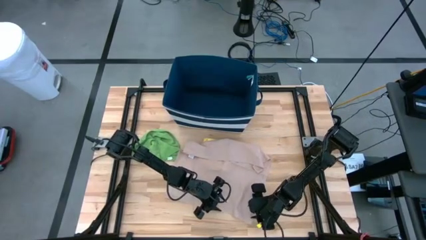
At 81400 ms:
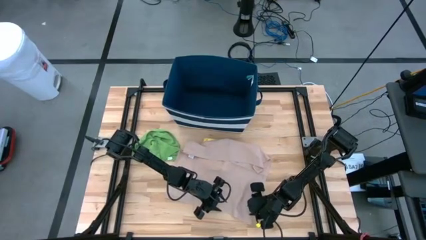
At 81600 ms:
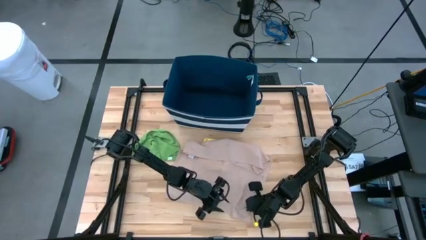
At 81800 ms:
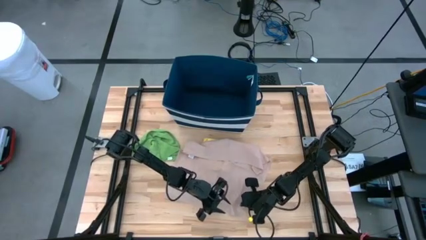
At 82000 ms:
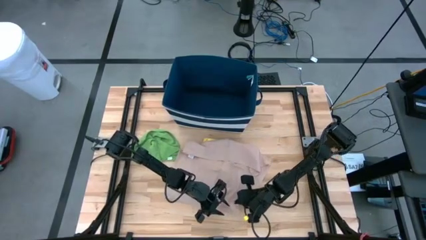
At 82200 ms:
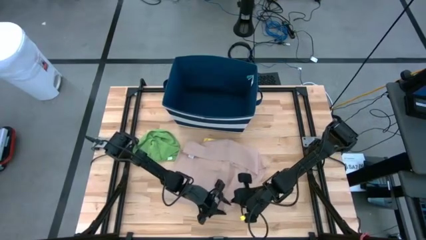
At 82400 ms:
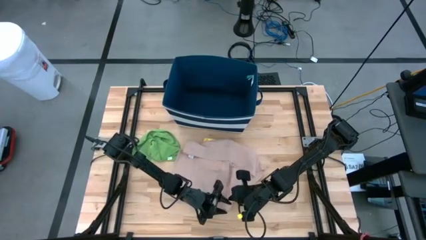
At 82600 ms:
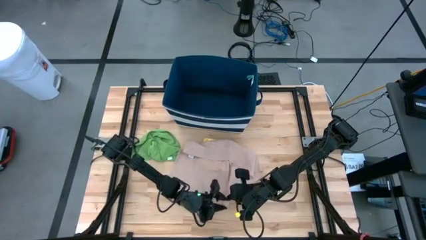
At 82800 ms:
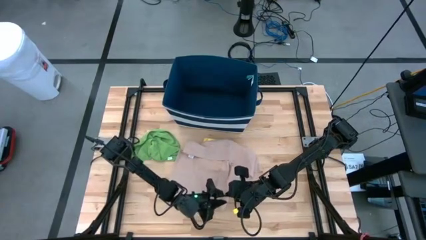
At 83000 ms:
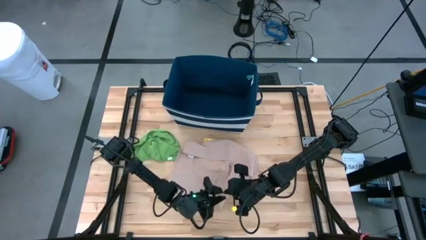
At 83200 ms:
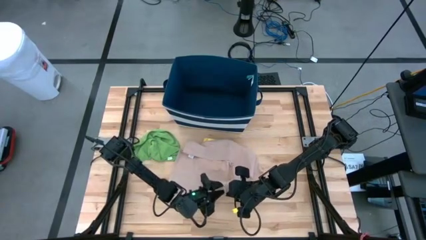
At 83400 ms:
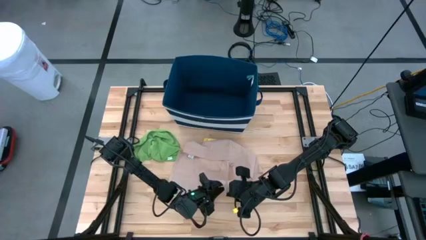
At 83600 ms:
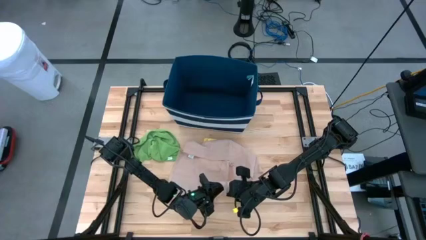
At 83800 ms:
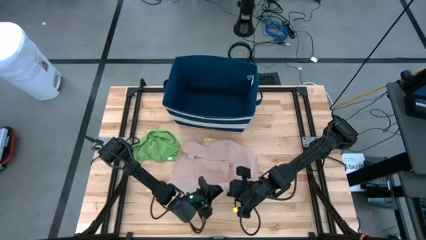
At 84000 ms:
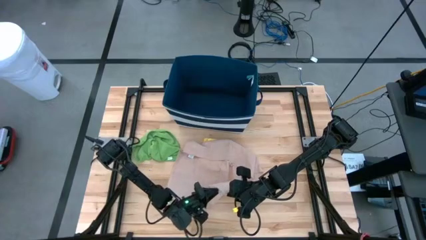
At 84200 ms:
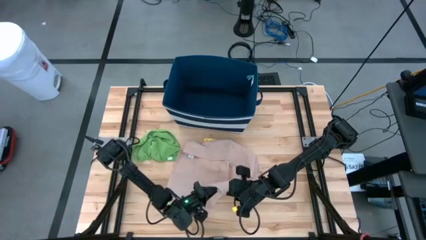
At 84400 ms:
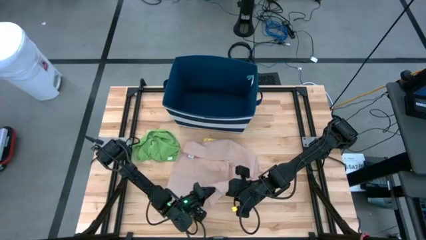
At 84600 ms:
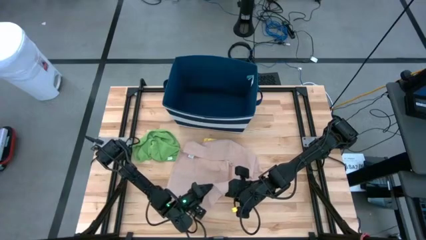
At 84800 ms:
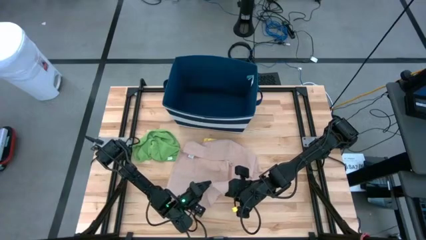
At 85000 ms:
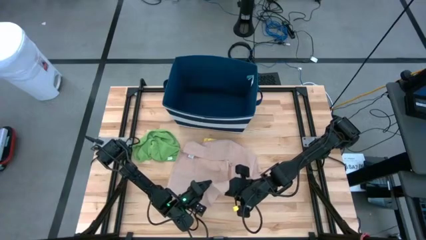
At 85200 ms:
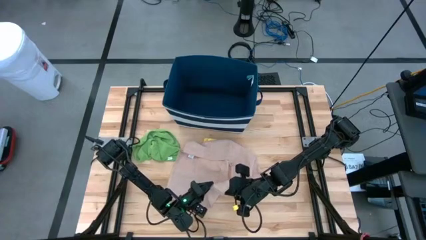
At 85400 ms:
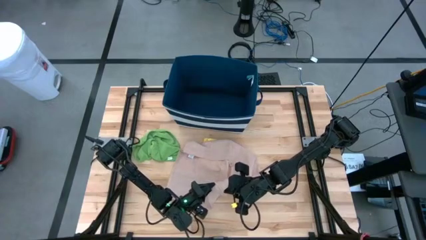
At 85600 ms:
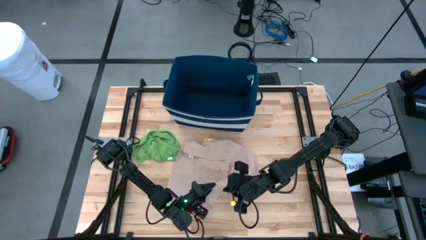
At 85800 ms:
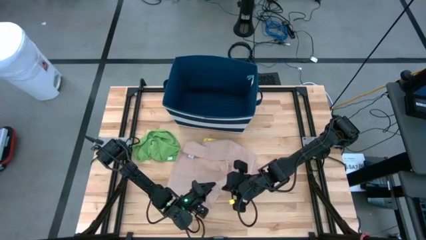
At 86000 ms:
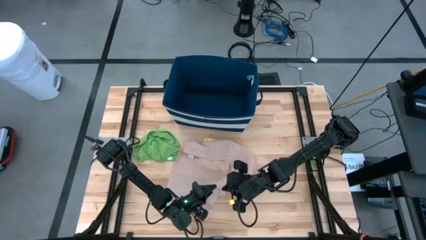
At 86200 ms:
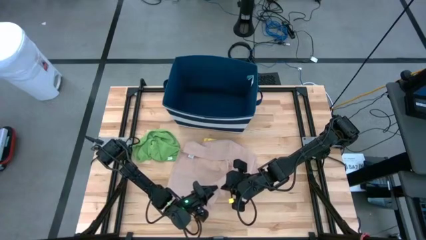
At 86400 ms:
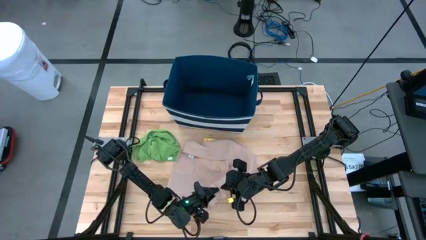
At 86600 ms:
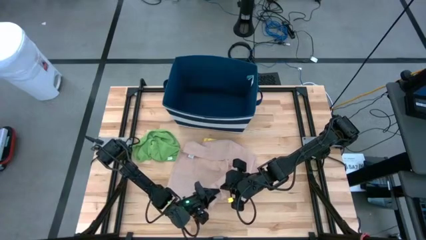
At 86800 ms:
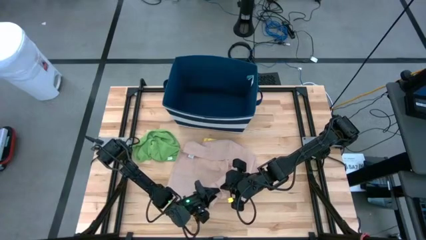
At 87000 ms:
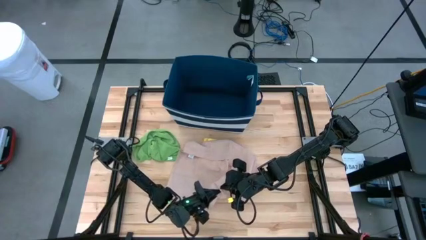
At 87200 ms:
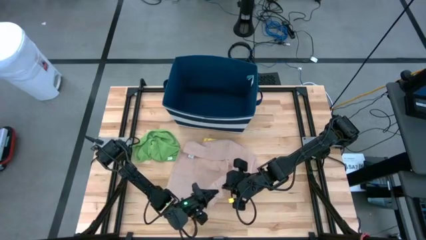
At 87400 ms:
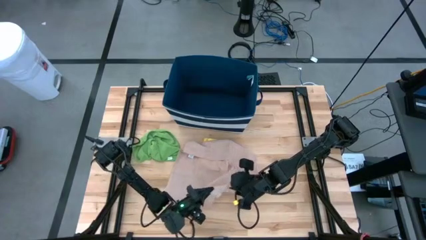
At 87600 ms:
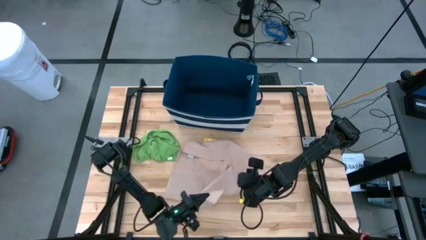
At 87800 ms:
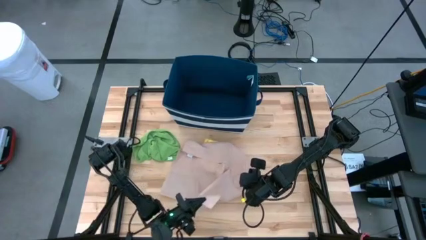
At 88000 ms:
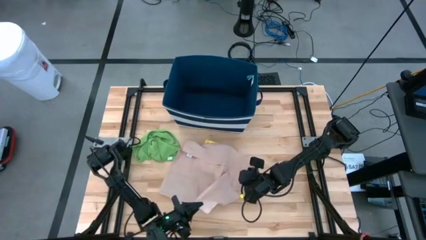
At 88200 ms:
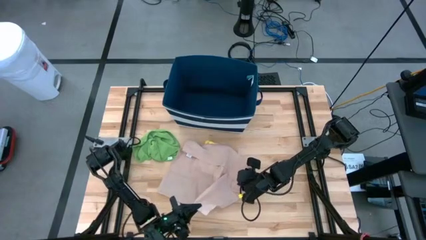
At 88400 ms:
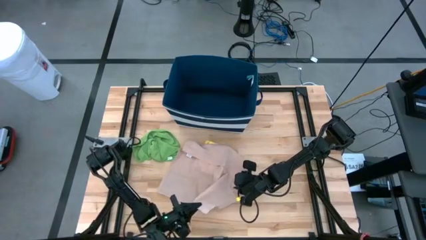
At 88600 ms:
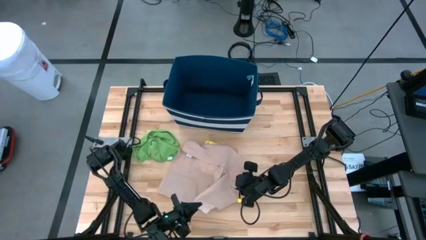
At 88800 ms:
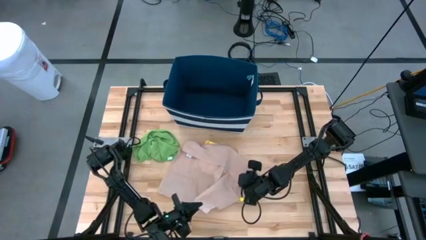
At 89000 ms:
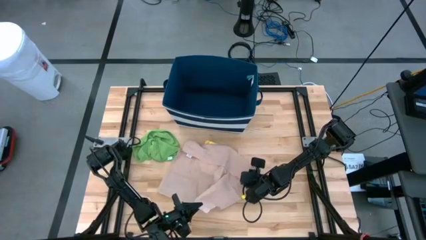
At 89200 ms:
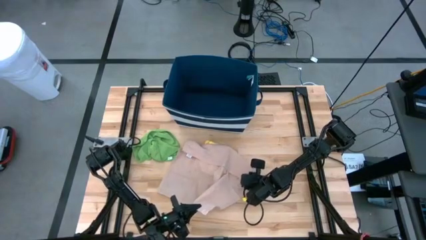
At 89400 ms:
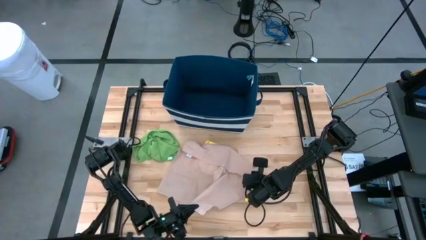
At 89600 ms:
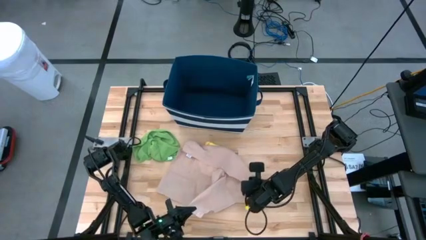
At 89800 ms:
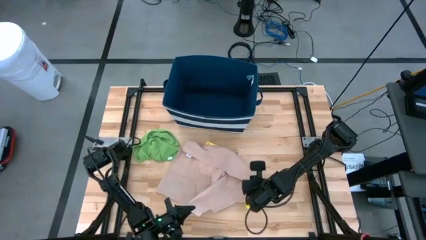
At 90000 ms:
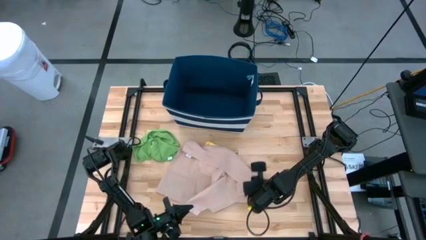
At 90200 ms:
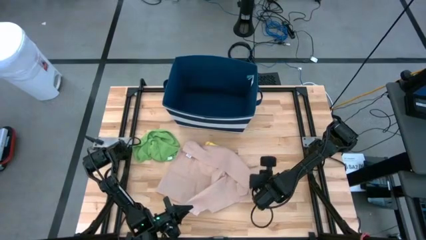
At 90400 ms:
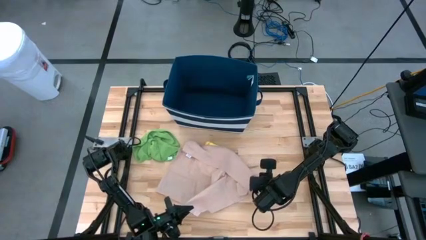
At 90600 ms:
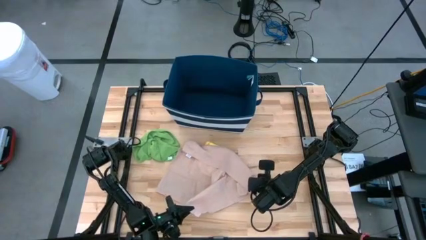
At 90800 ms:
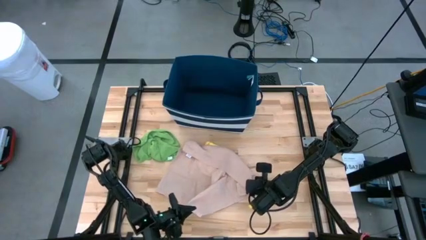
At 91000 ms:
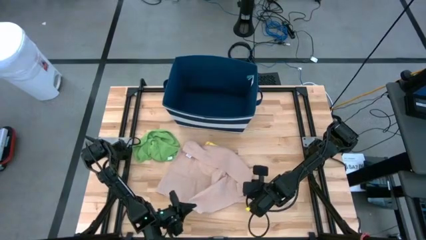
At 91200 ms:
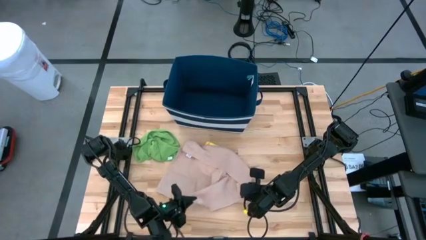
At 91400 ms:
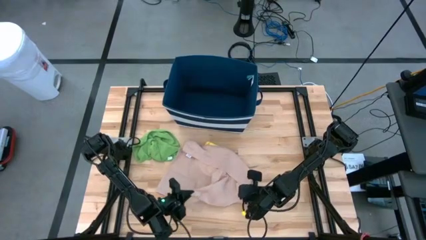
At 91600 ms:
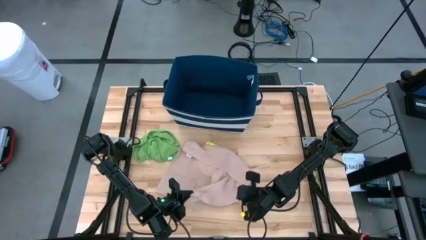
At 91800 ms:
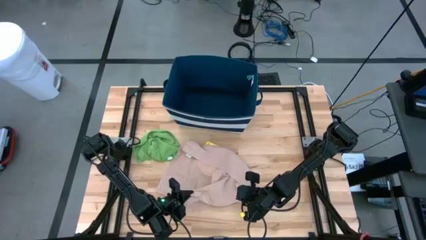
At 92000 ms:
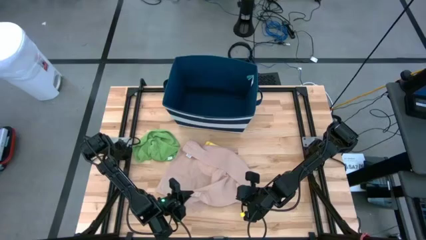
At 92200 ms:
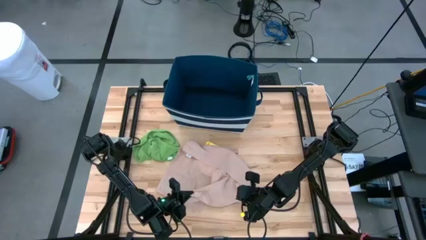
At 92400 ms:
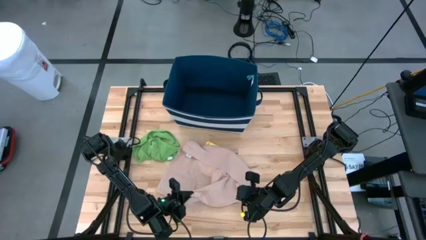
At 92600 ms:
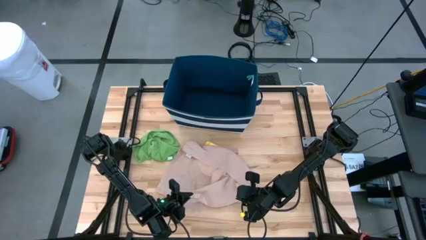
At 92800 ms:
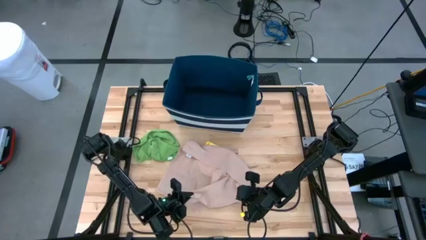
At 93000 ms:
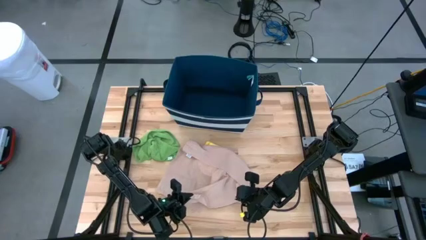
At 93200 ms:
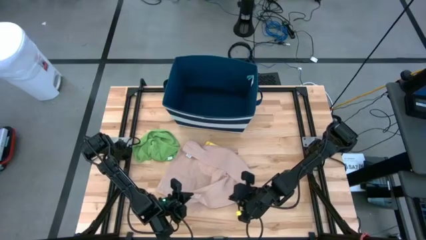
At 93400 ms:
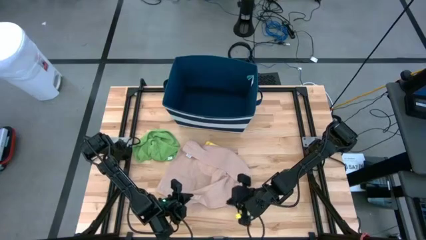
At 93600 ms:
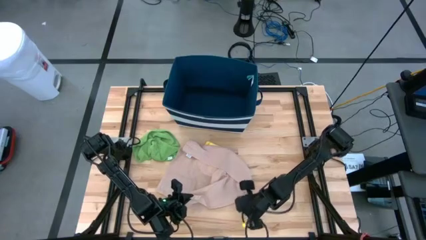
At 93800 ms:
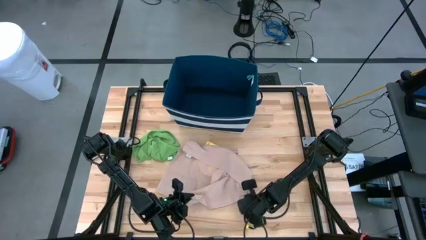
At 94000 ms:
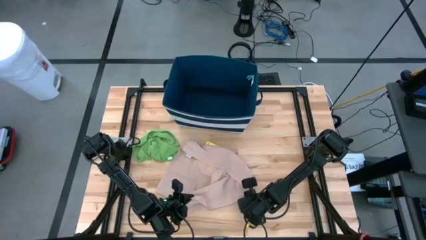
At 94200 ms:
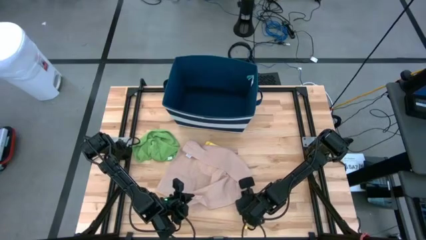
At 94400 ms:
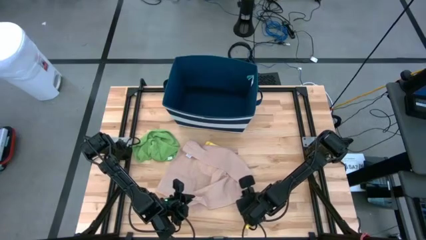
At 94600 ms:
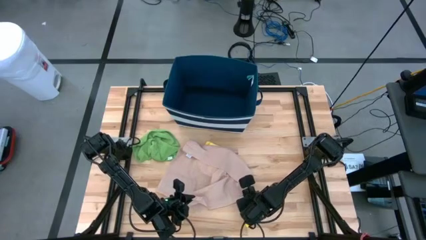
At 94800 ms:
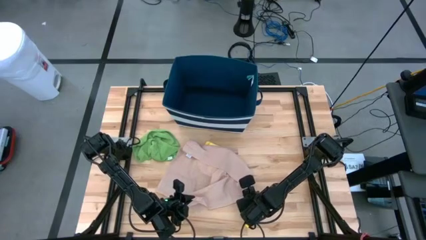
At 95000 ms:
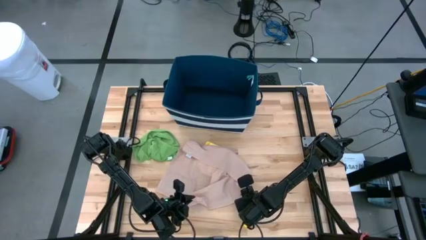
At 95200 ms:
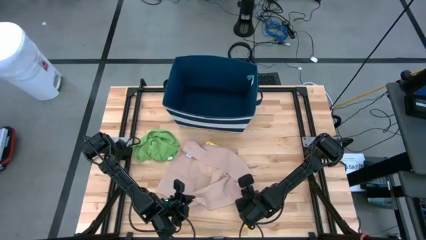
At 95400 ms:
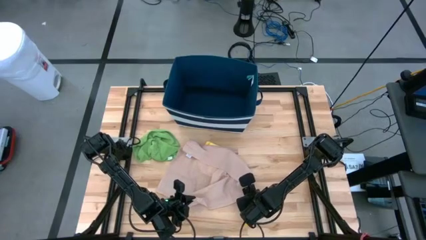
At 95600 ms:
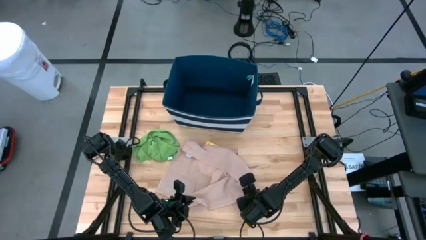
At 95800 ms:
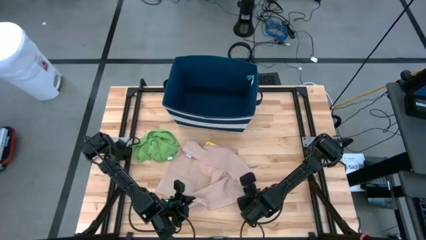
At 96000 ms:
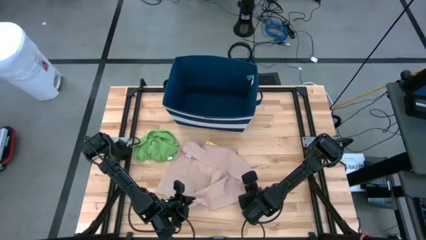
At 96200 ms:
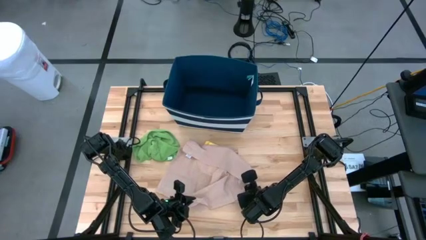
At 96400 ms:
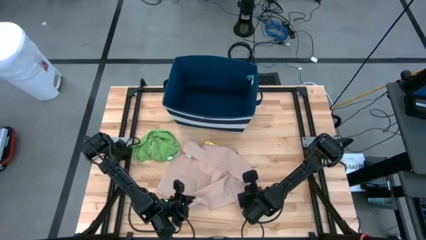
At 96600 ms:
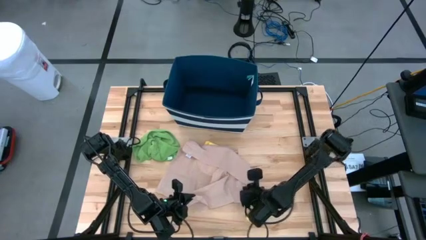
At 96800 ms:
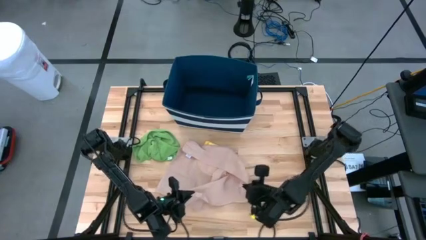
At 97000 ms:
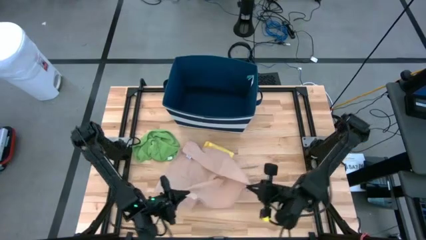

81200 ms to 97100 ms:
Task: Fold towel
Fold the brown towel
